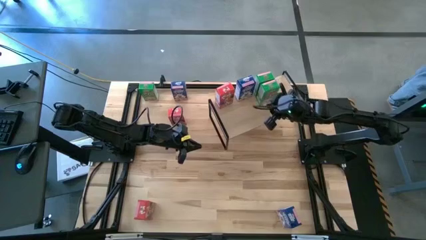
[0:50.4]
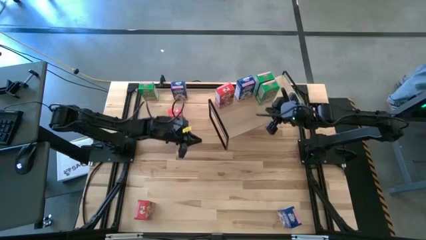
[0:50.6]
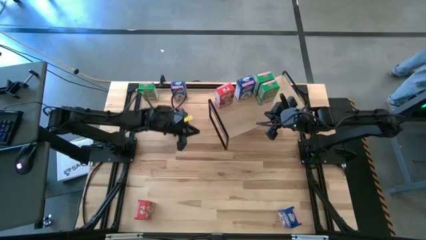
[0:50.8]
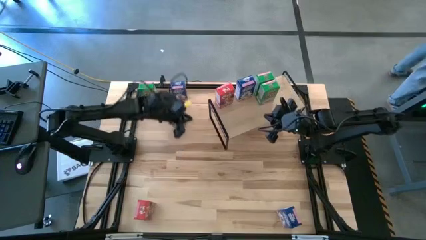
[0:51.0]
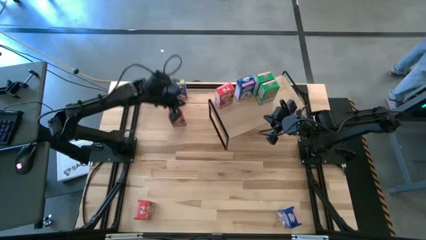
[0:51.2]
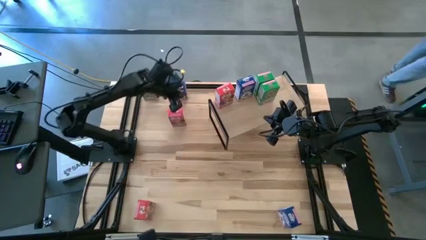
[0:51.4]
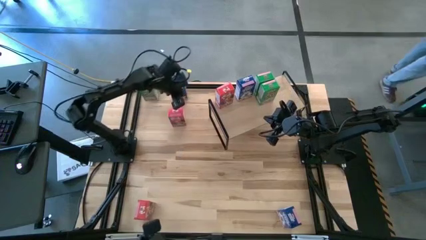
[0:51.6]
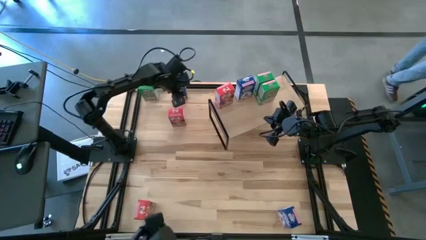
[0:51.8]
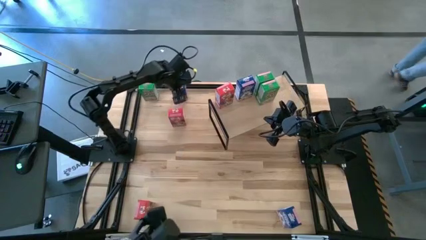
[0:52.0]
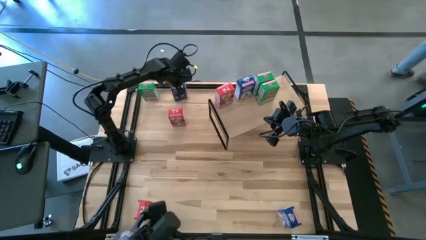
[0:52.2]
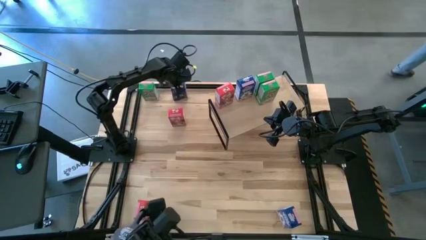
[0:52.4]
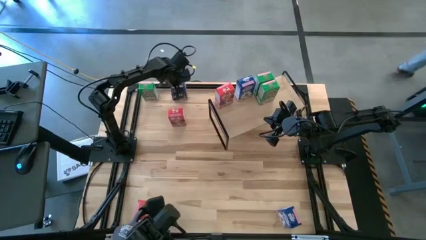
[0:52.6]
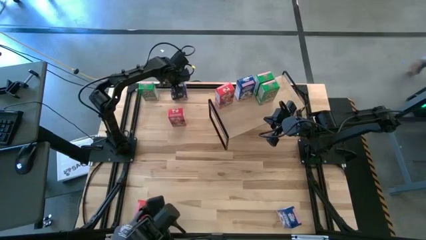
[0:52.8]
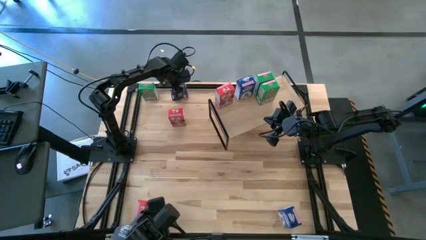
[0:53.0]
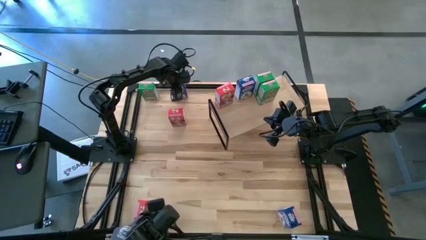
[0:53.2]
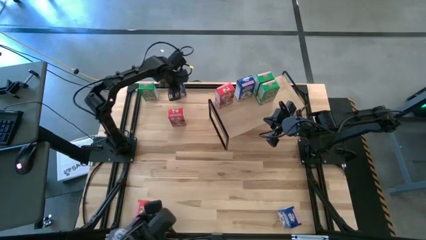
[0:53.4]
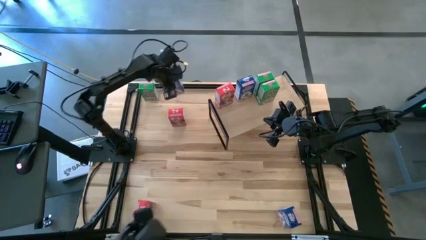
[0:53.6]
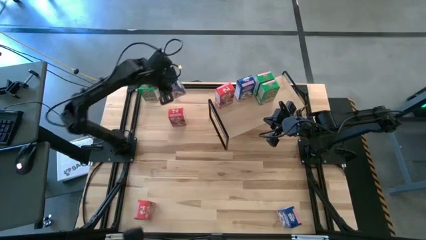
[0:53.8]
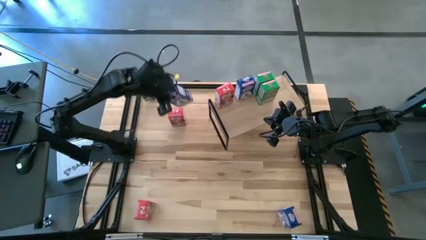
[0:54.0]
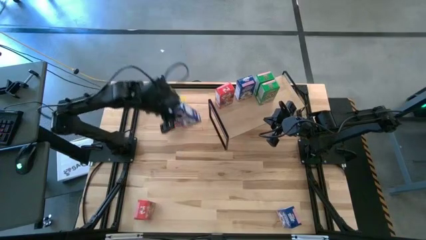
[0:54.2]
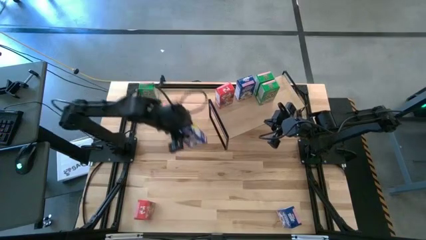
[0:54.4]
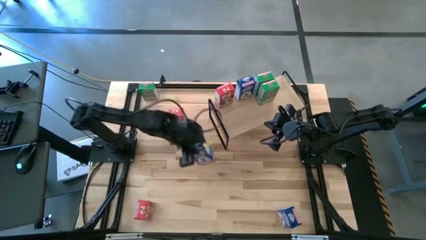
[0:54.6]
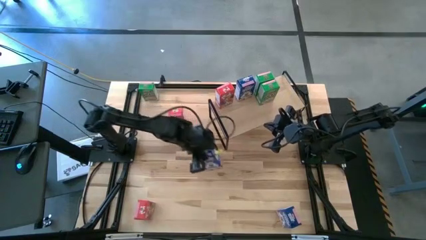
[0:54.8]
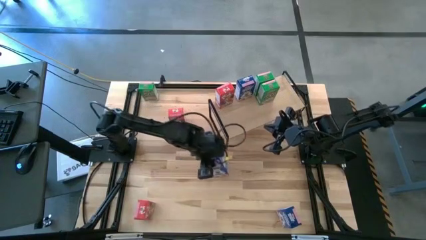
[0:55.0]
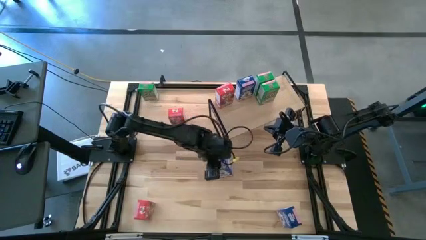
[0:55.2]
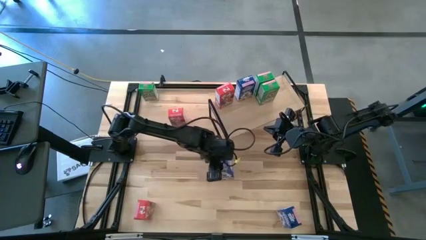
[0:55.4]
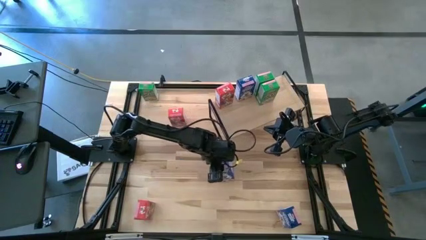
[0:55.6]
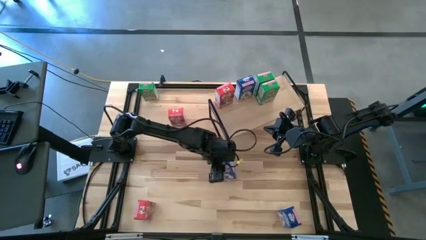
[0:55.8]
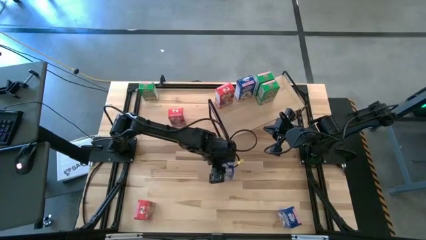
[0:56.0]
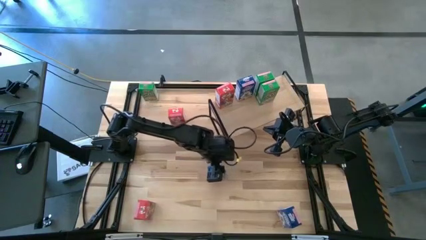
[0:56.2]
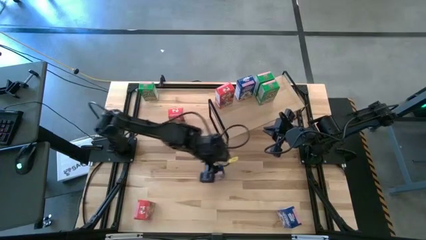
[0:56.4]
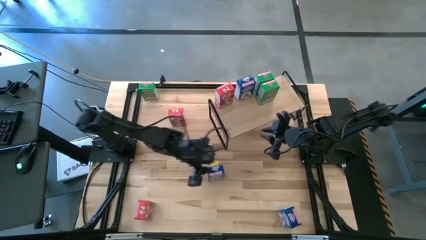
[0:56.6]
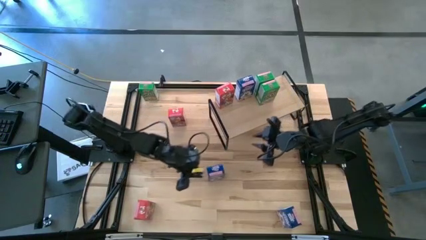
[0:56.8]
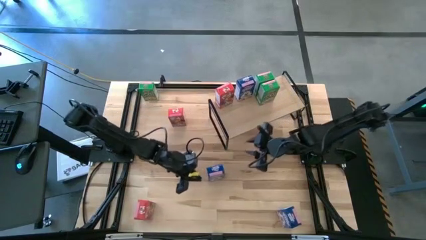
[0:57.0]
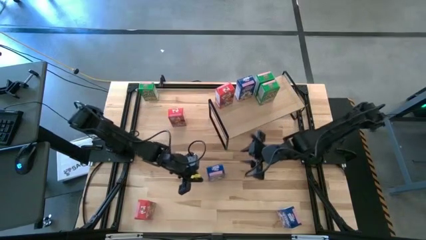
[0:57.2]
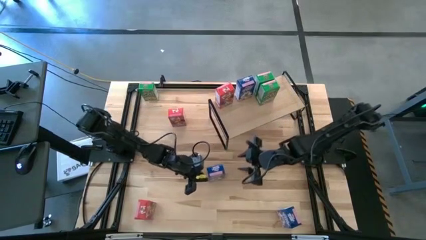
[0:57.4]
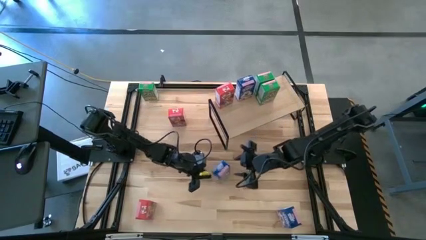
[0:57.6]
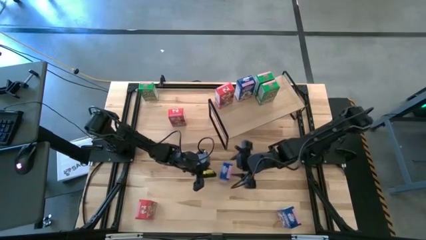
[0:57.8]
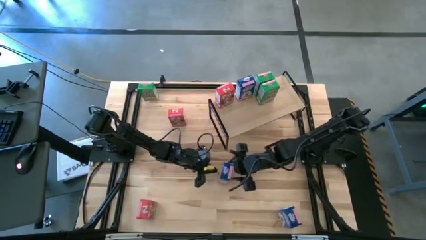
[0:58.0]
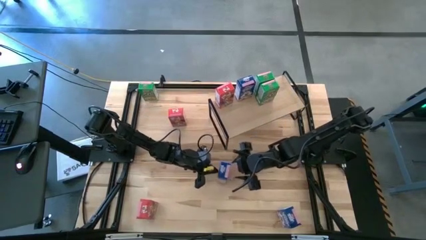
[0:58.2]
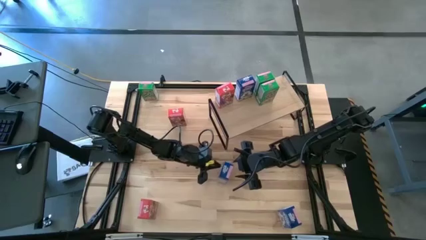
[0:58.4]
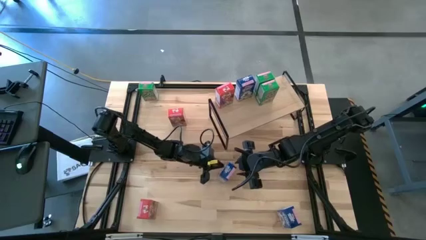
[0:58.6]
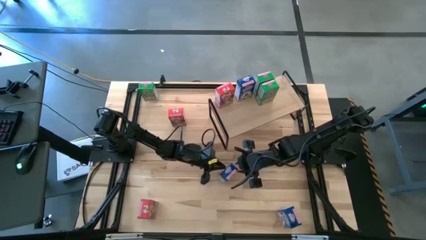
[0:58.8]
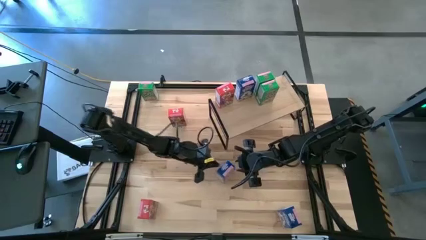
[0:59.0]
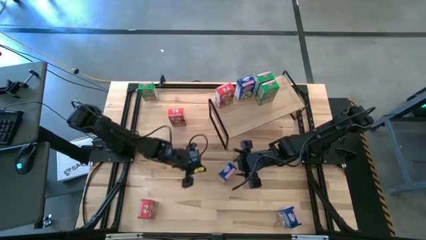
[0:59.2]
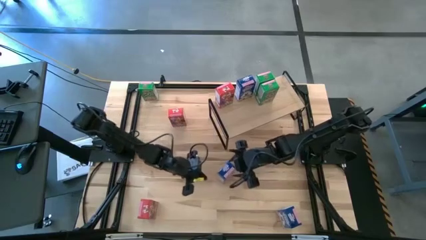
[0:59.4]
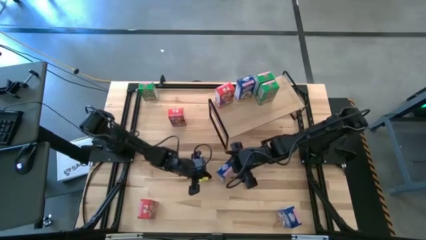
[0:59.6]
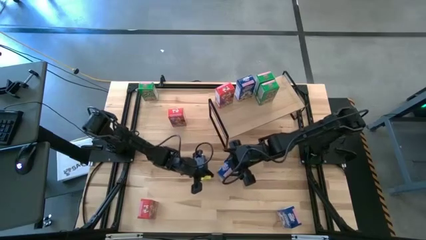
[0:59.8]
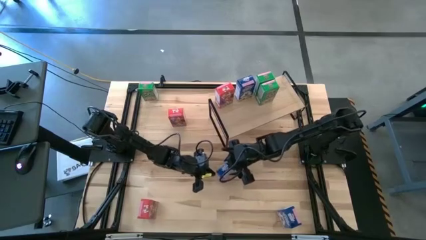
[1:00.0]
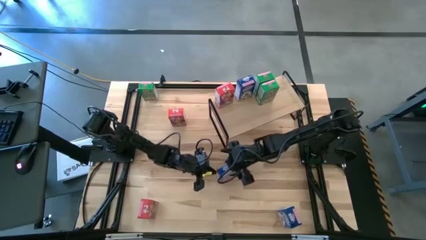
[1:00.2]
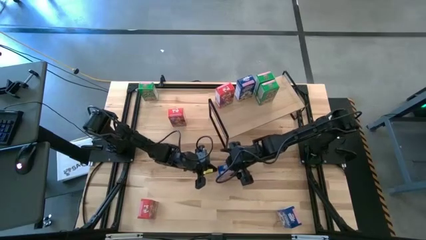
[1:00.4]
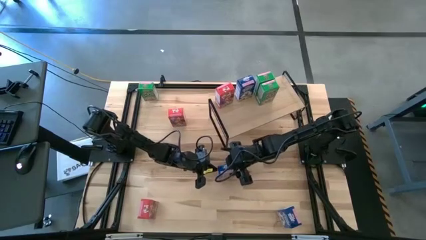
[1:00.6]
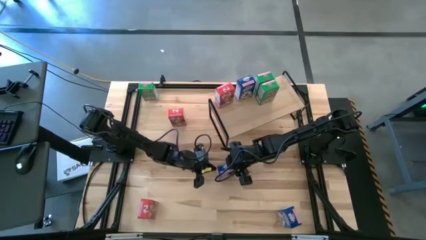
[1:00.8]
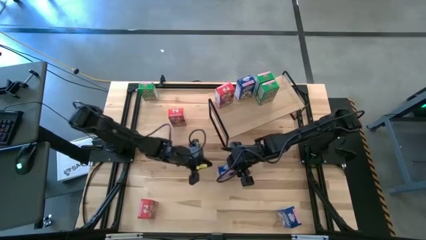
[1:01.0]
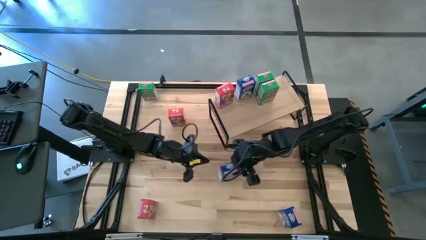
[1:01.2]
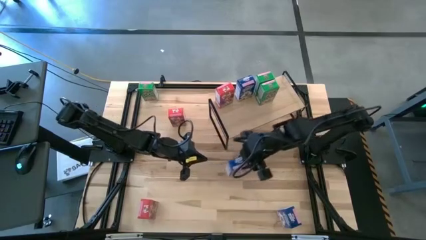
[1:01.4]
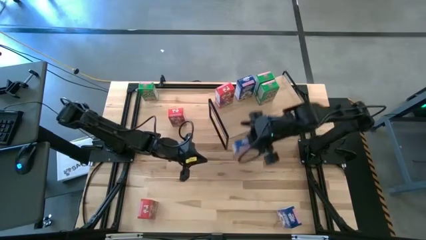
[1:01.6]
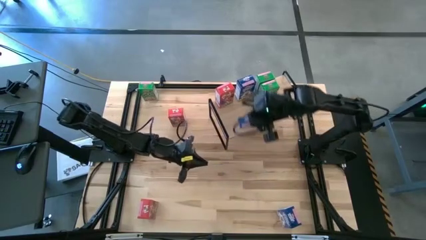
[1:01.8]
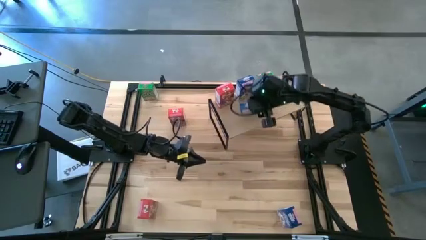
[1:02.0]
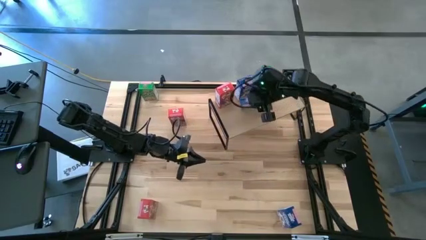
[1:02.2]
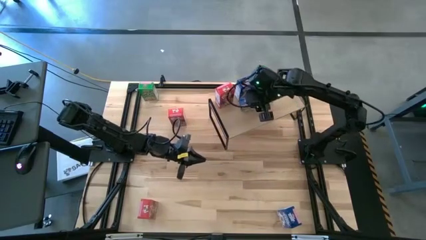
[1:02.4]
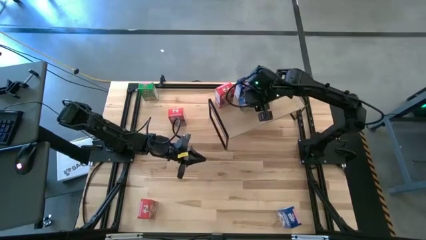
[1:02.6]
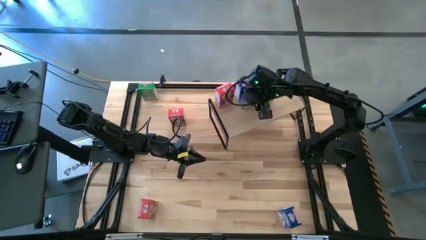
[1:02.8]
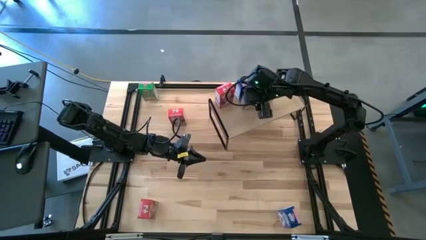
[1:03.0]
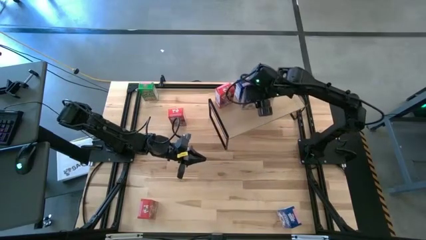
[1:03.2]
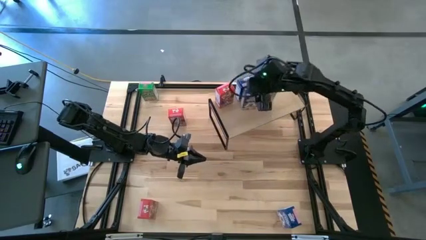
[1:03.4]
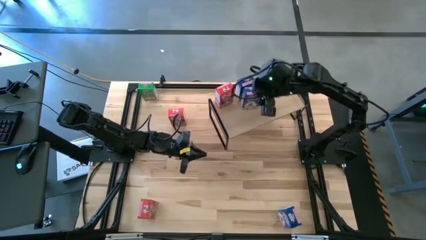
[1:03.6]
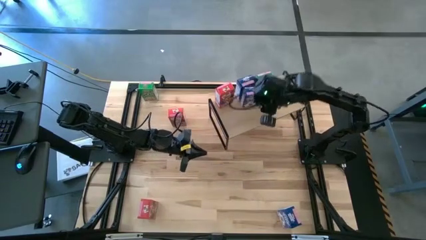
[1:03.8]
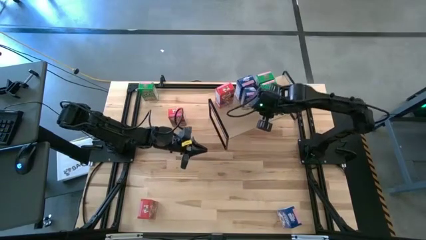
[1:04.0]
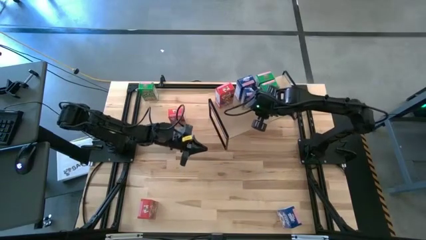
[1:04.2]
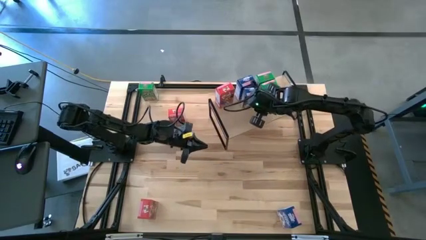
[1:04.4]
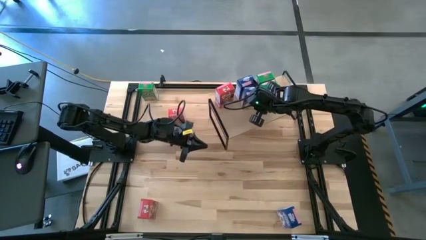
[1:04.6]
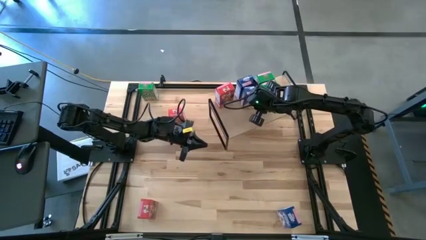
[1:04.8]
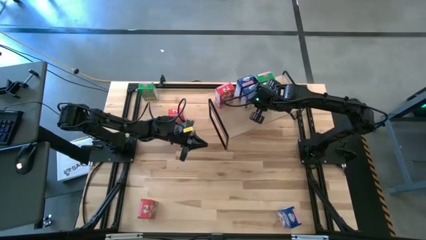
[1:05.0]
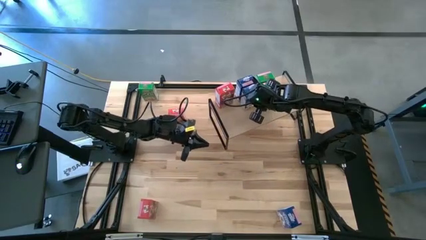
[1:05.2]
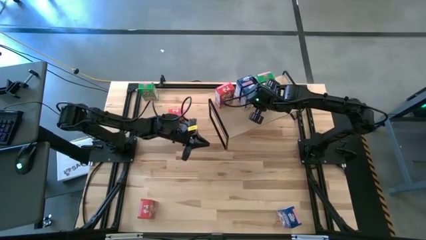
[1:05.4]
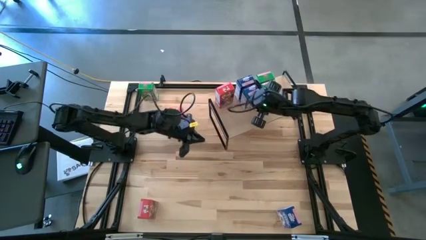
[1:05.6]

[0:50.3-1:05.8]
Task: Stack cereal on shelf
Put the top blue cereal box on the shelf aligned with the blue cereal box

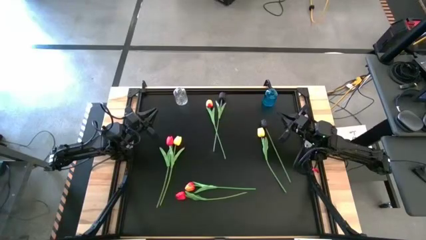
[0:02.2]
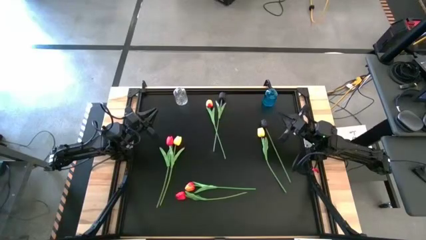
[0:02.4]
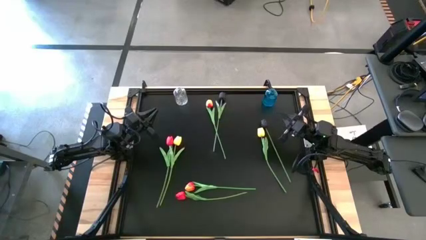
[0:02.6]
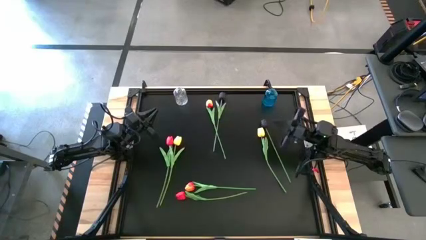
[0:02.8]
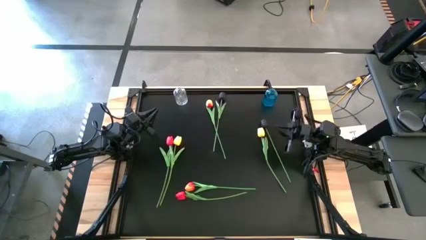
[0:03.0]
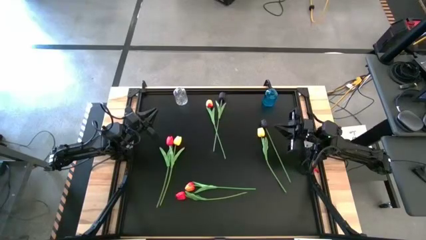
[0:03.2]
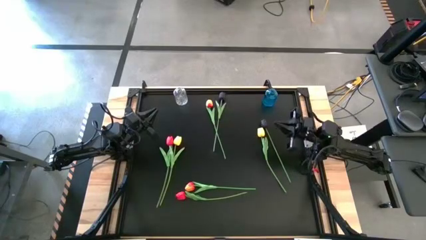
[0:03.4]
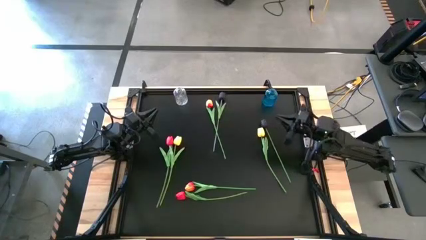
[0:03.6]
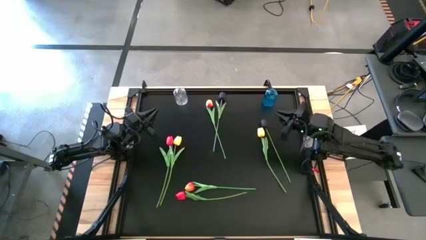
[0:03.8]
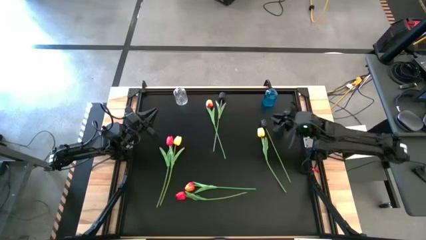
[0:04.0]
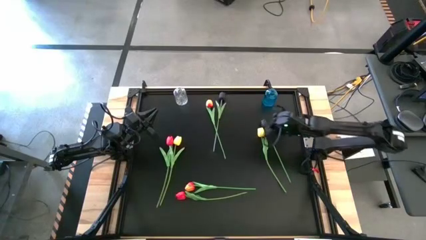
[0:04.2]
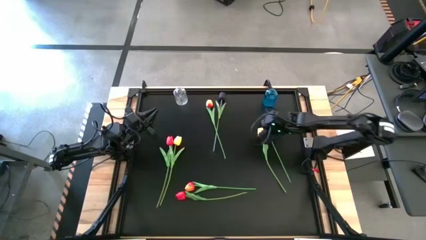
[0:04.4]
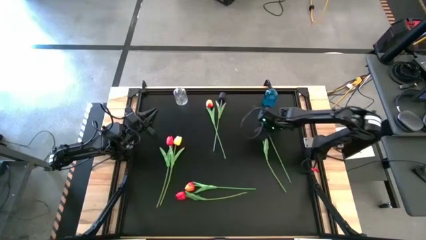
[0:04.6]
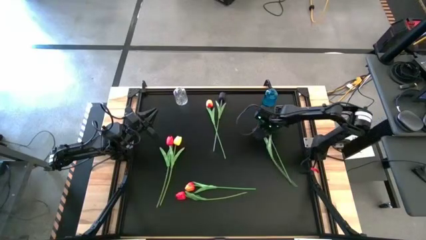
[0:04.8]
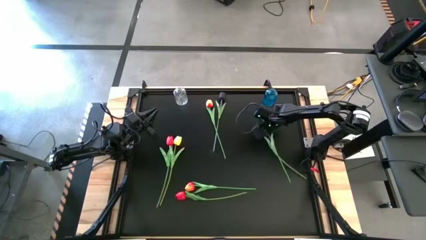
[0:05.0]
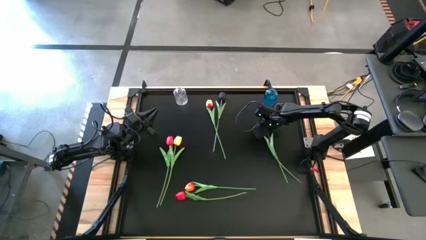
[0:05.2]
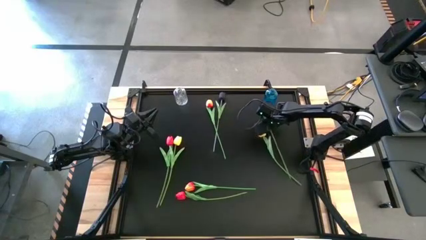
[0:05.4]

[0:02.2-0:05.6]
Task: Sort flowers into vase by color
Put the bottom black flower into the blue vase
